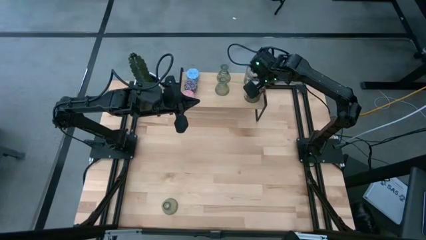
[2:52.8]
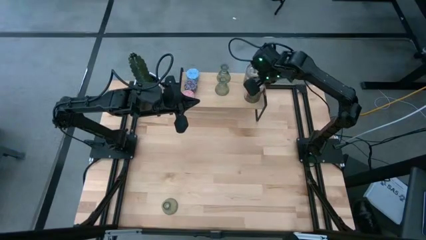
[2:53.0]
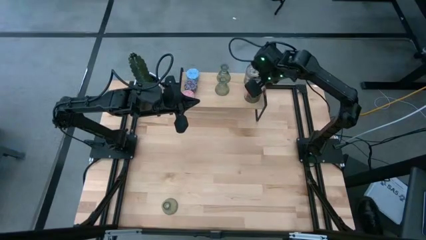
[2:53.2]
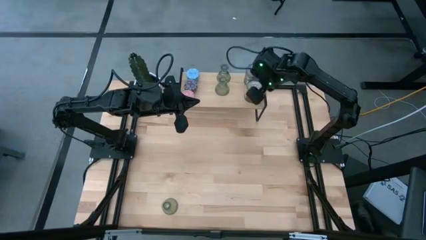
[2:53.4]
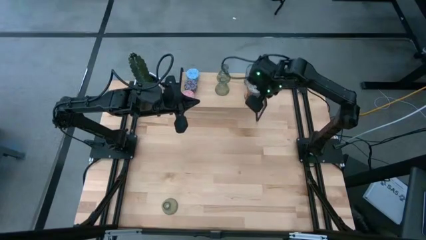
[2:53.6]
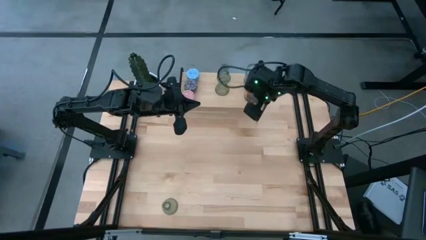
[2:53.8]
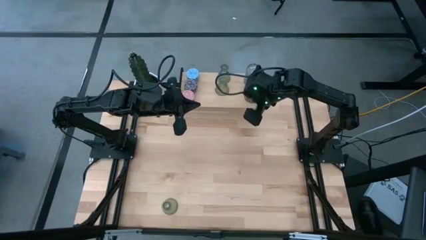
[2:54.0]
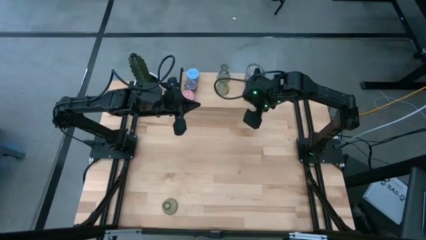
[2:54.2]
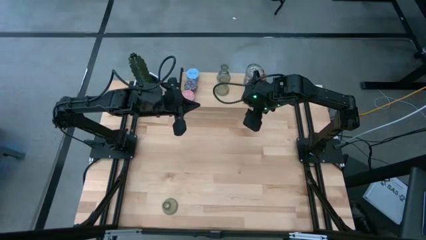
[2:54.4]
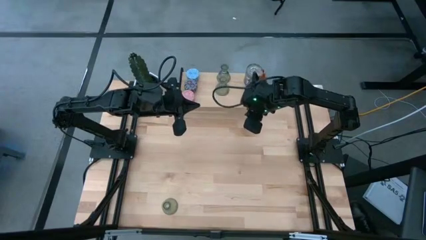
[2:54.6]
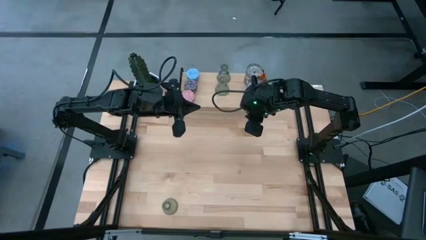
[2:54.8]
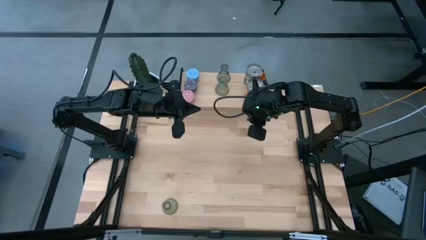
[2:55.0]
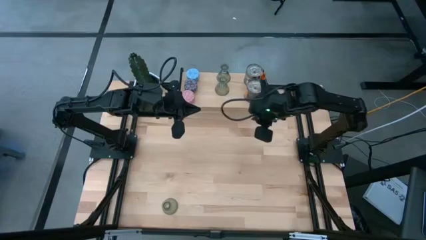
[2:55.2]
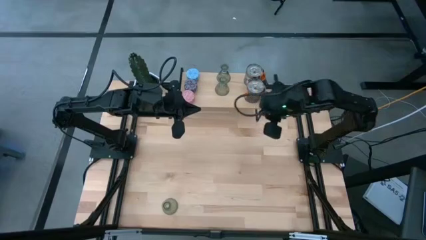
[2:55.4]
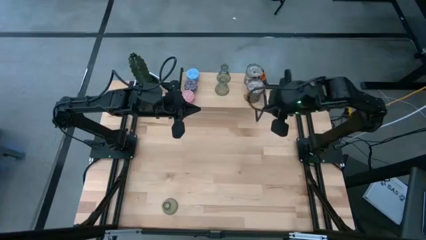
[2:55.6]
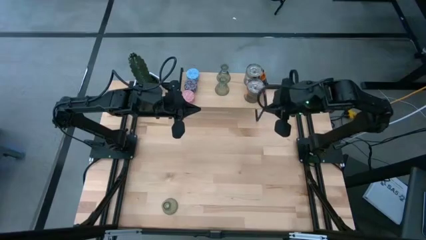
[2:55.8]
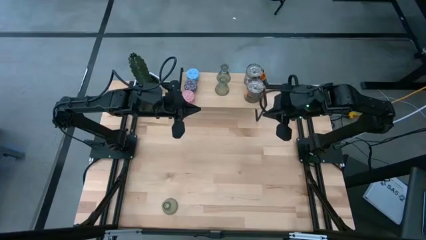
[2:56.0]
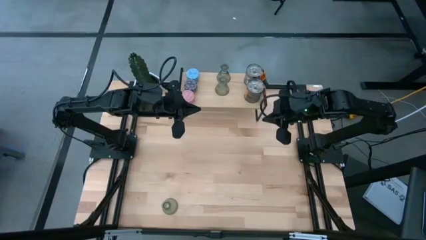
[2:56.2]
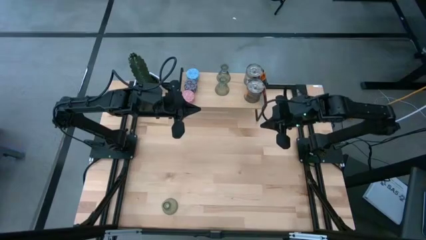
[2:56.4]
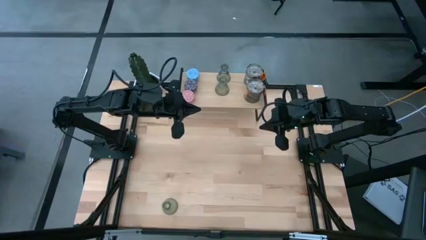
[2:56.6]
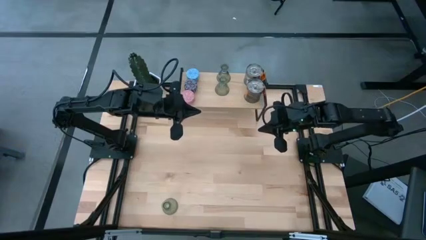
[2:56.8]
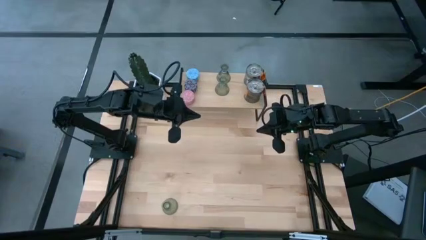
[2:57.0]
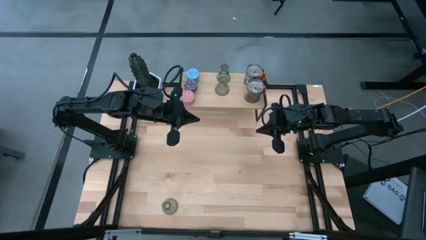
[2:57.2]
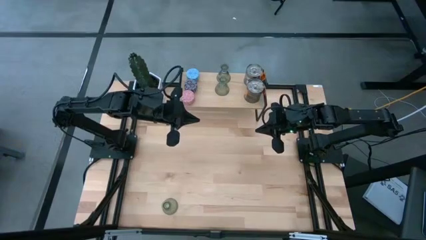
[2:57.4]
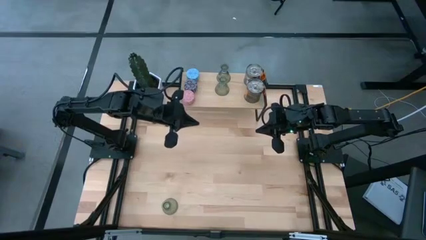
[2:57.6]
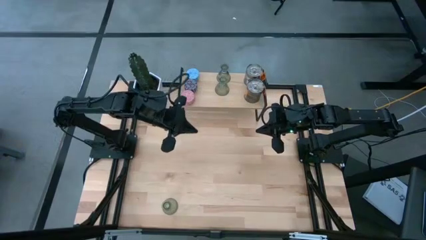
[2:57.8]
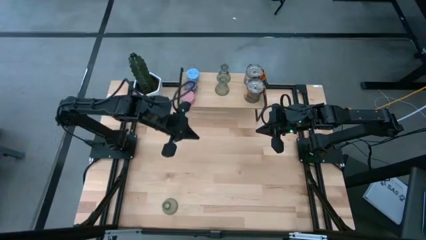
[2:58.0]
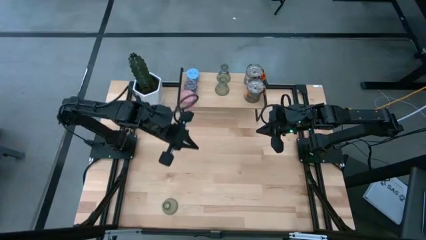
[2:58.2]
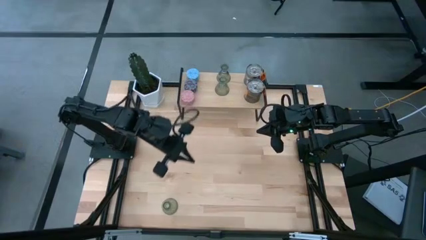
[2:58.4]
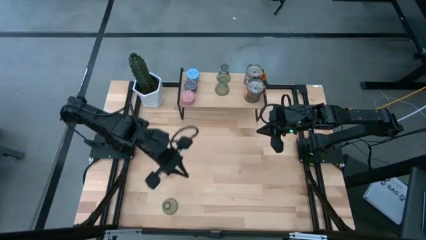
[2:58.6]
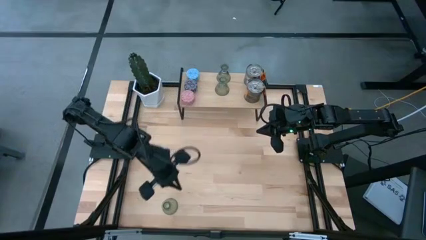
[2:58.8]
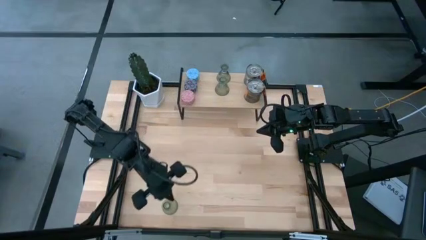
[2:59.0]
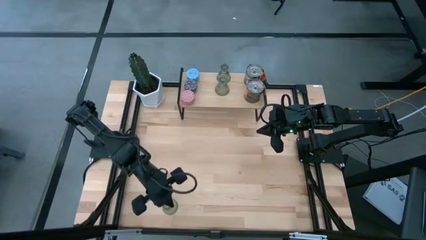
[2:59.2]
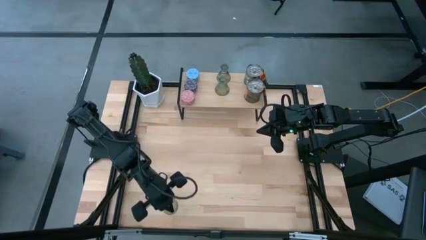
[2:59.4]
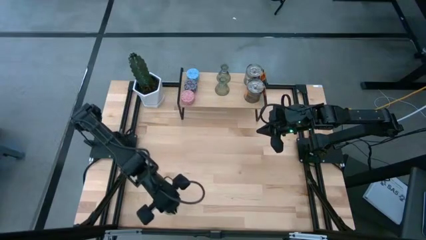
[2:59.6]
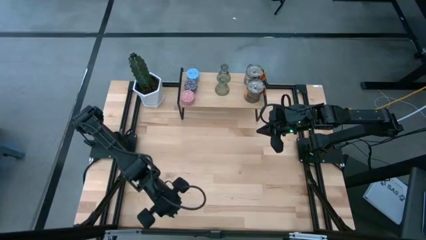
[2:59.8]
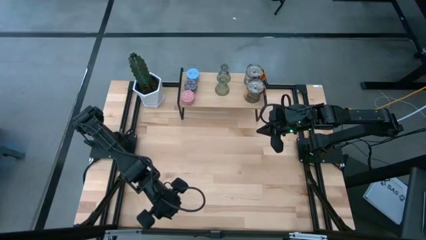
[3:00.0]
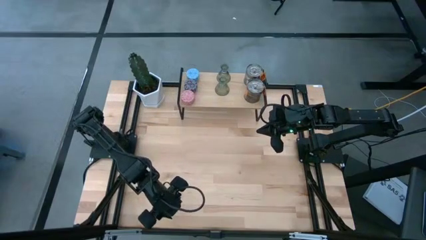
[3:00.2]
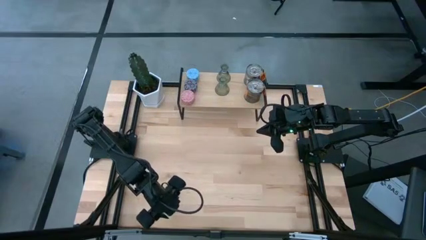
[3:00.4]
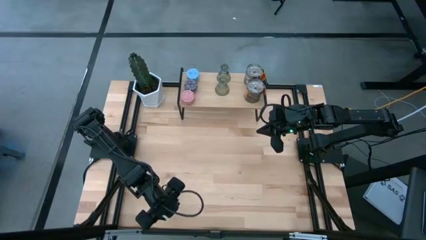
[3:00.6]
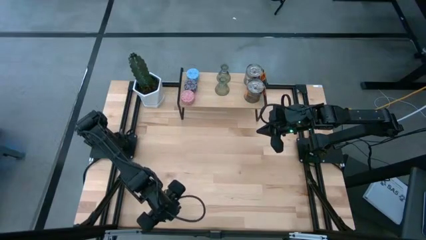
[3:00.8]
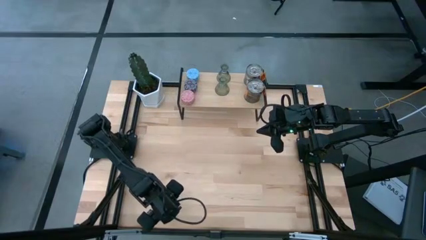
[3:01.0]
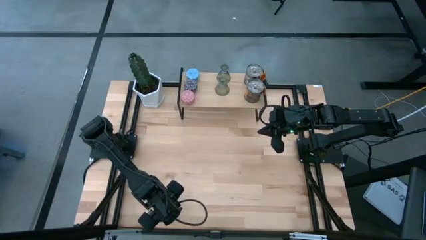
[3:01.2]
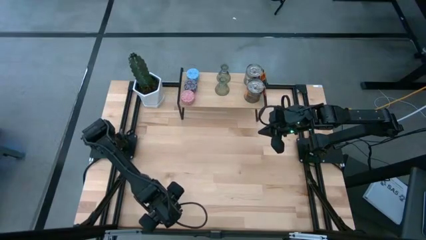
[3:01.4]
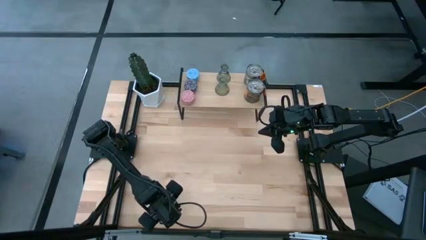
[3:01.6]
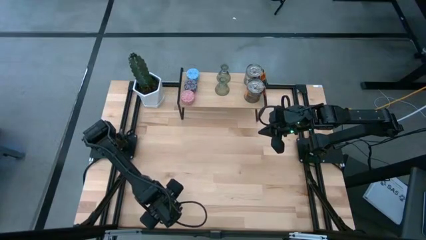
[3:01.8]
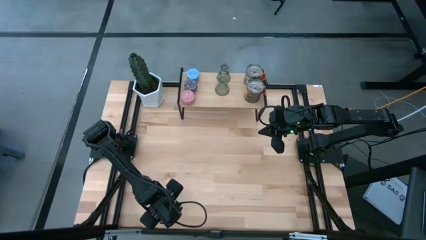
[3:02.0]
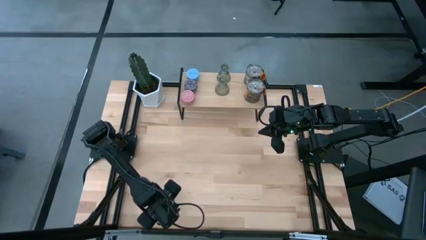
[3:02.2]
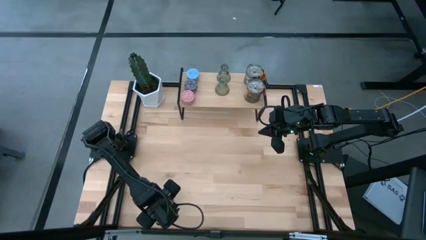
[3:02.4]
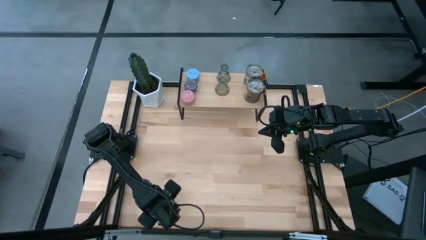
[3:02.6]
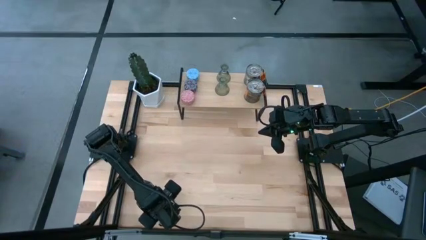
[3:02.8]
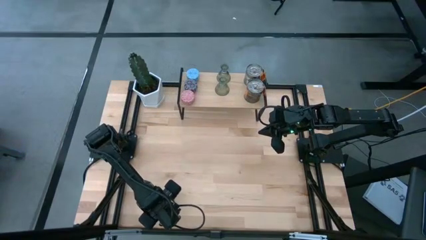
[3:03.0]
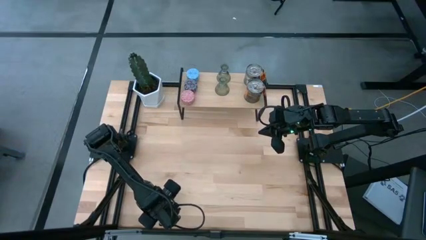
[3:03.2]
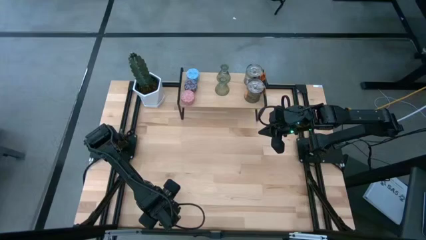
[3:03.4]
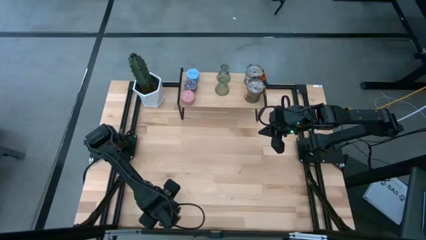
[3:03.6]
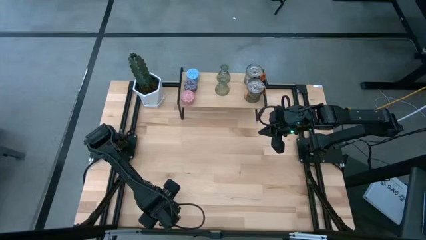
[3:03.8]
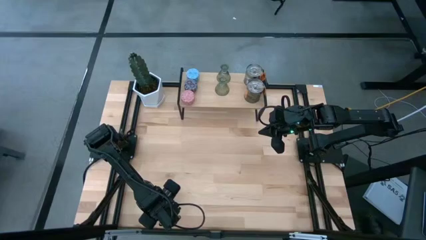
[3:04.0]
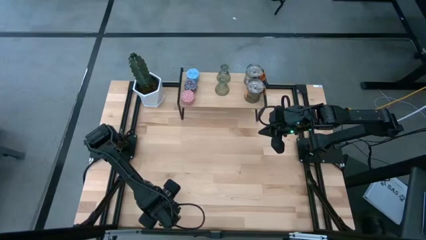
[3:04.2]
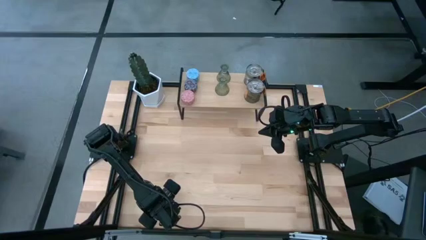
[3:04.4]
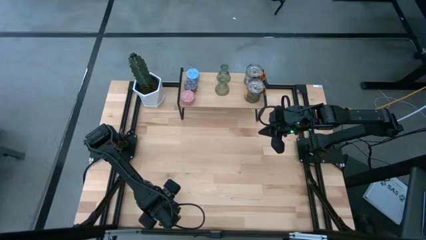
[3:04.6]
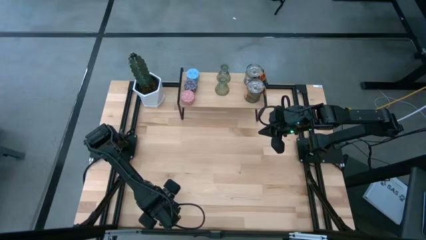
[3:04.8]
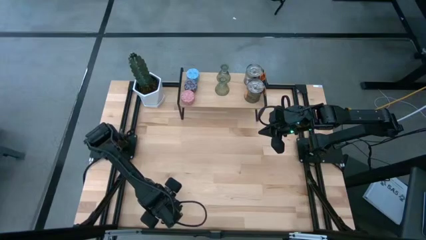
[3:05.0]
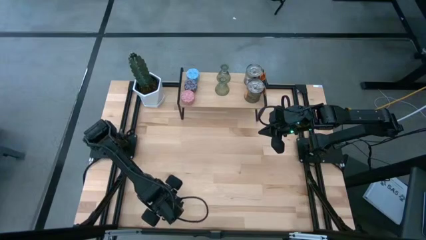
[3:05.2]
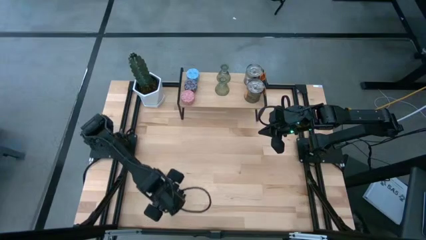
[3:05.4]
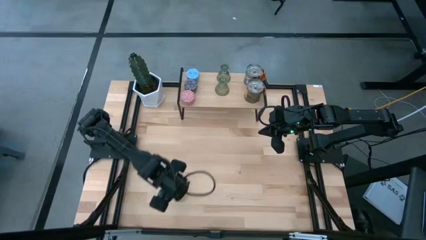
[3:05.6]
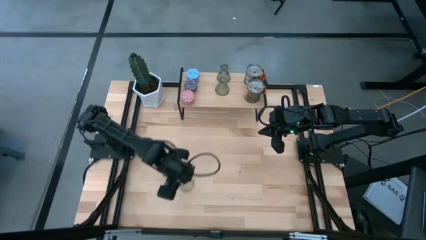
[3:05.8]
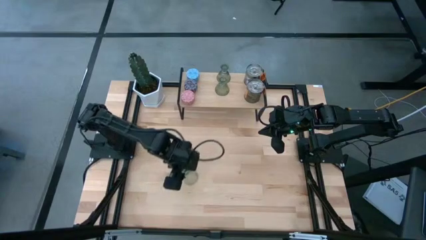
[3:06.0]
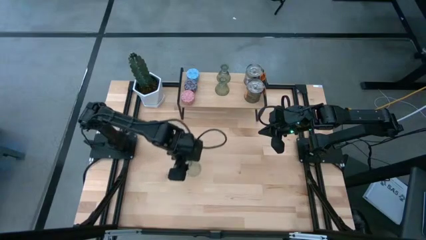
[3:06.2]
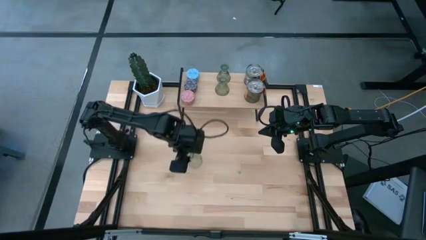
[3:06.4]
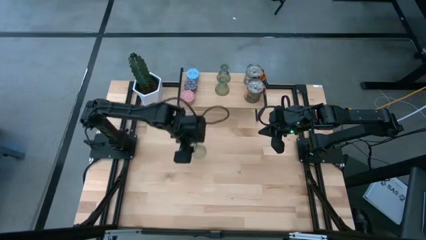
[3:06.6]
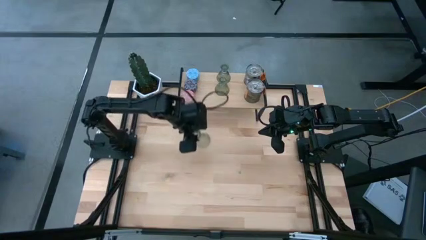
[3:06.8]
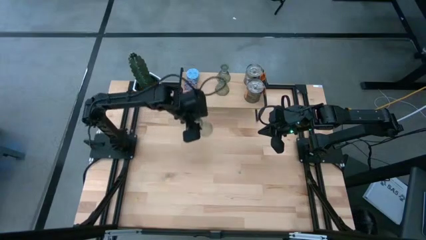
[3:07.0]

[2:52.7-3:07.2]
Task: Pick & Place candle stick holders
Put the green glass candle holder aligned with the other green glass candle holders on the shelf
